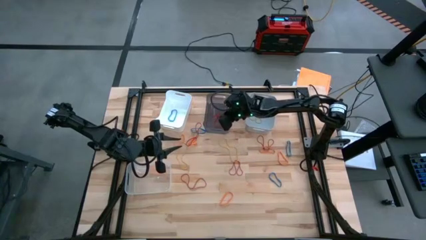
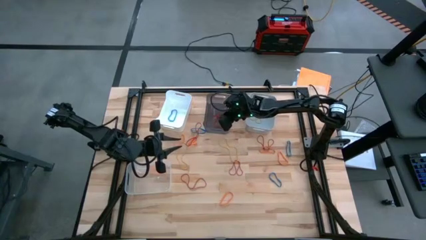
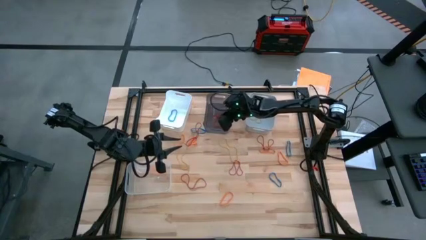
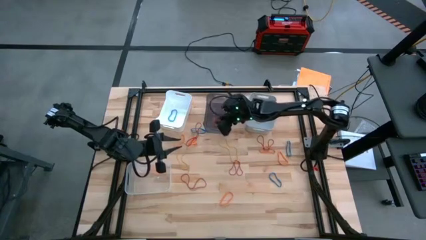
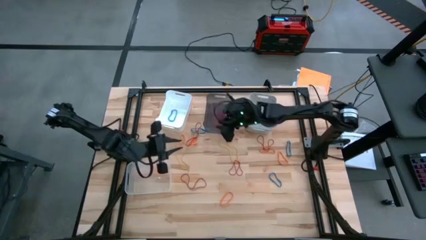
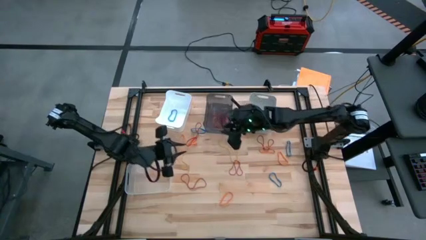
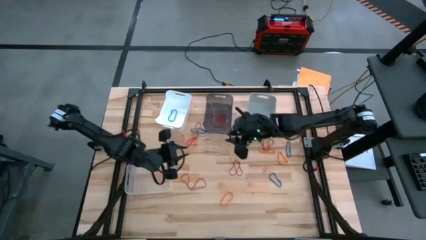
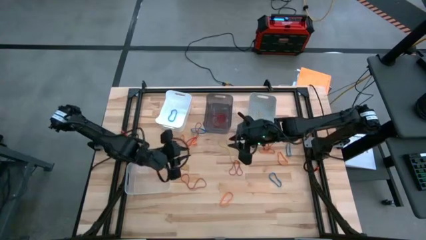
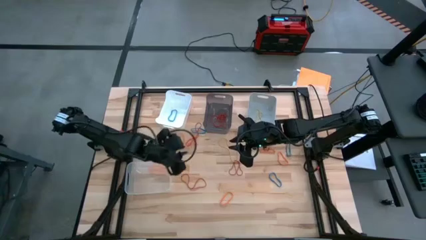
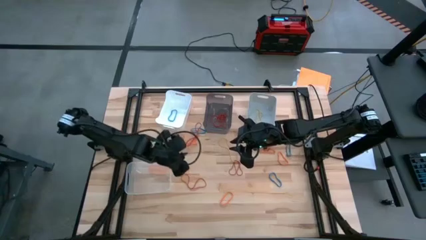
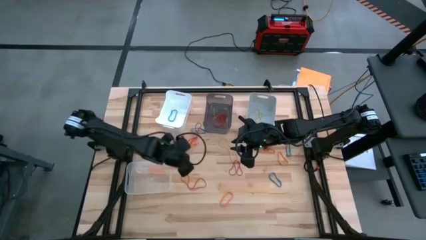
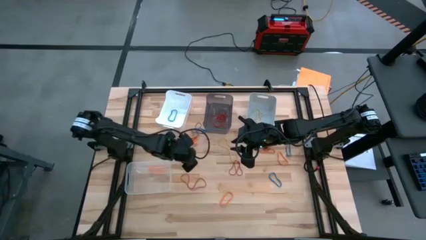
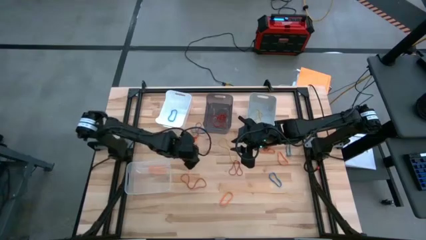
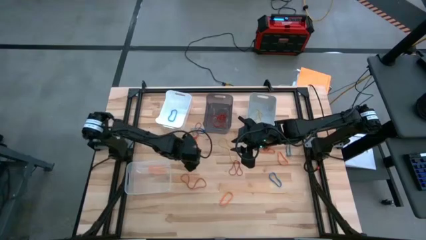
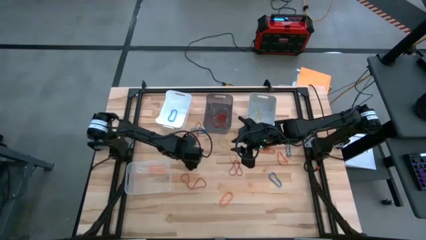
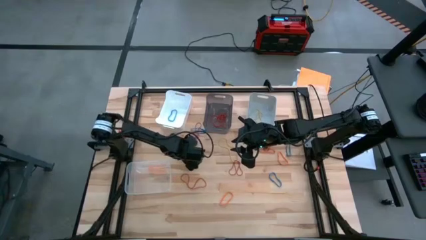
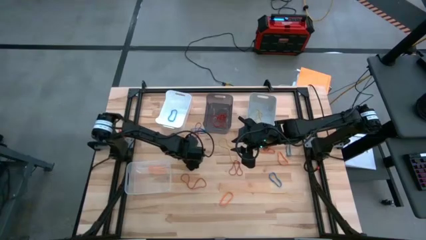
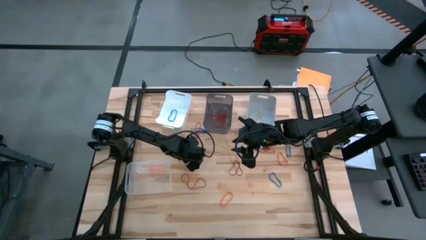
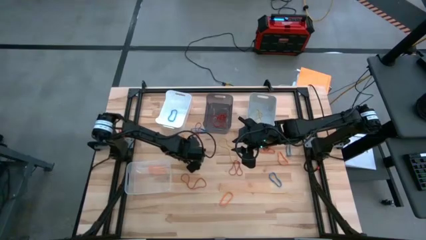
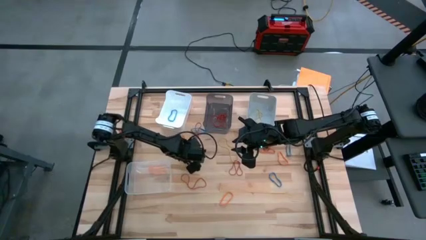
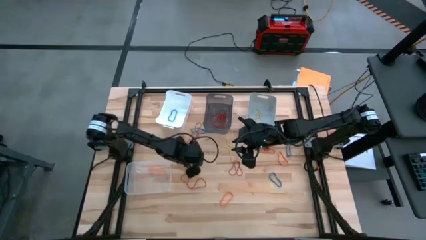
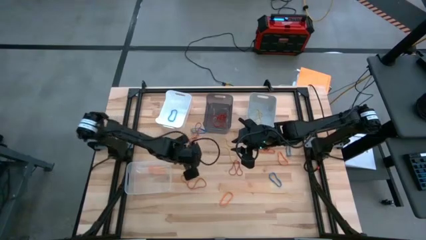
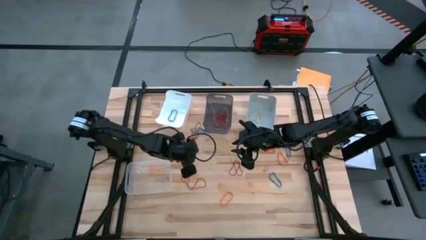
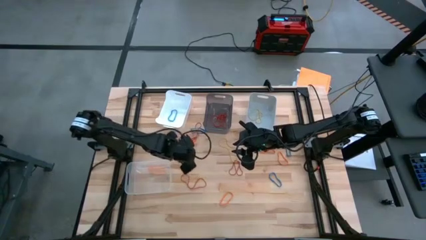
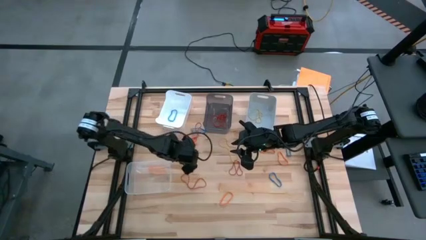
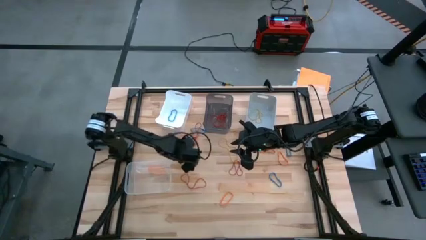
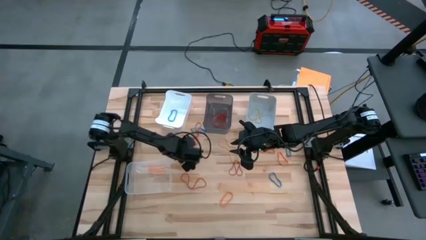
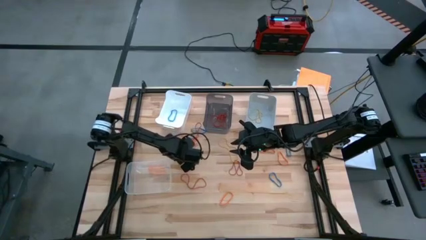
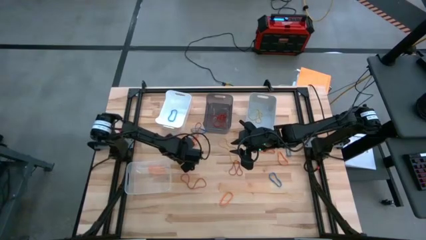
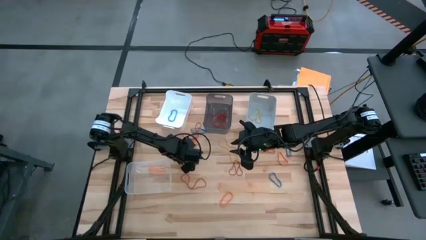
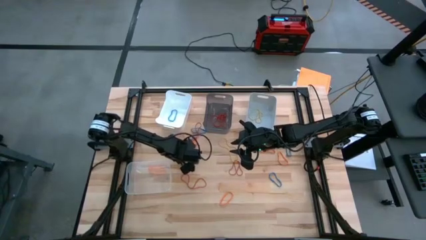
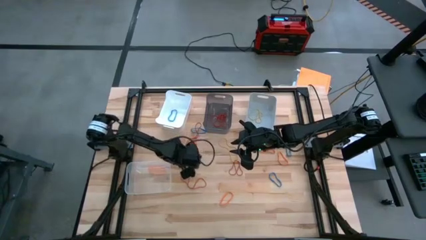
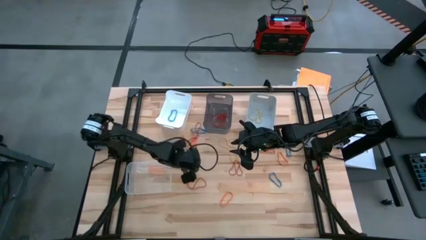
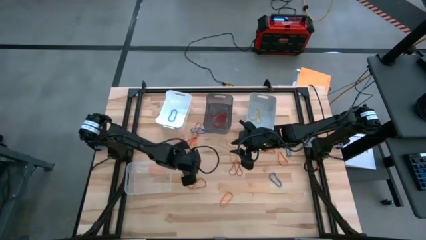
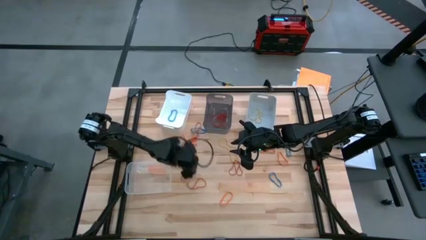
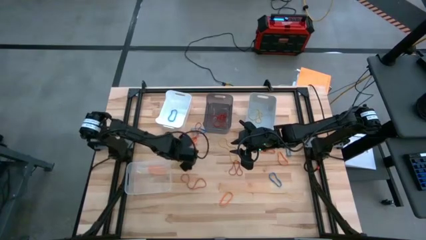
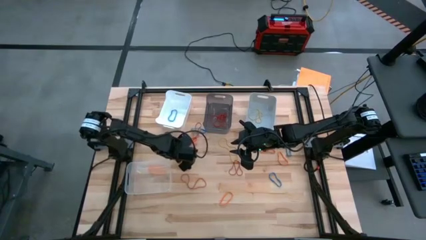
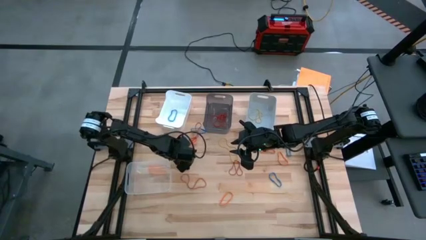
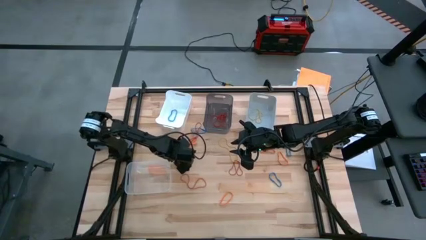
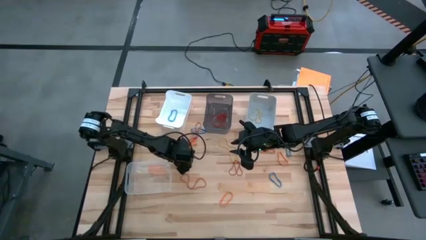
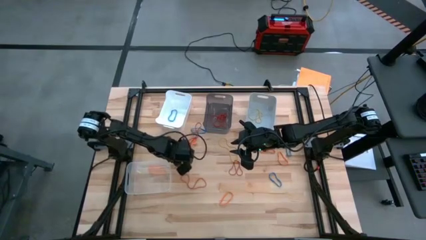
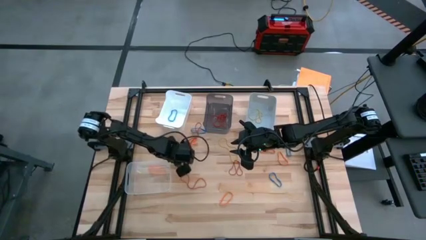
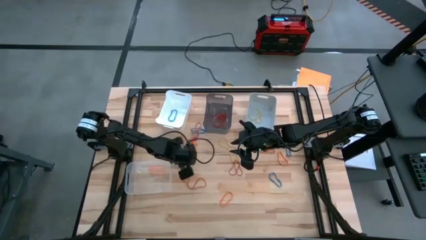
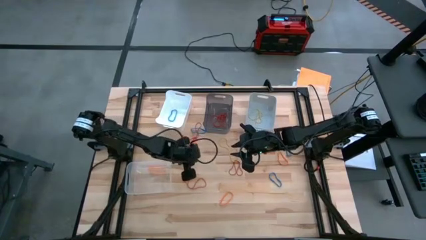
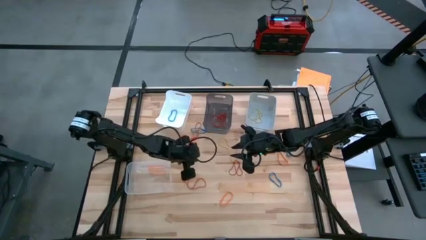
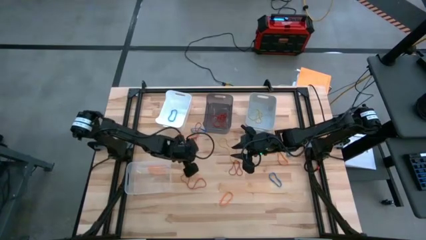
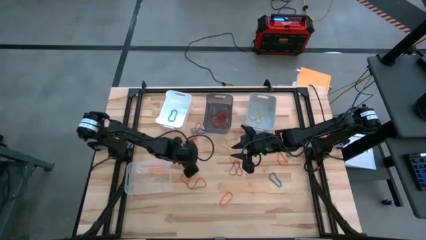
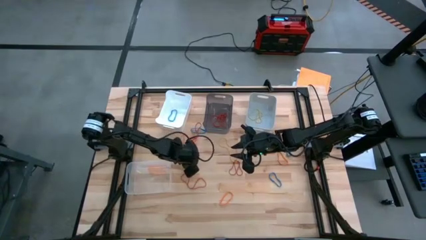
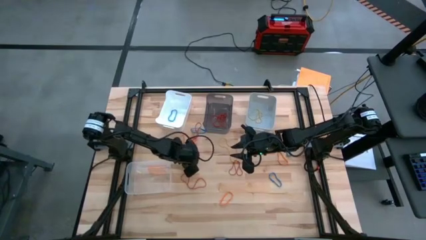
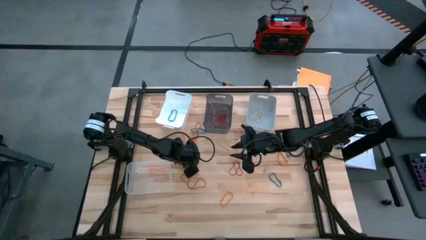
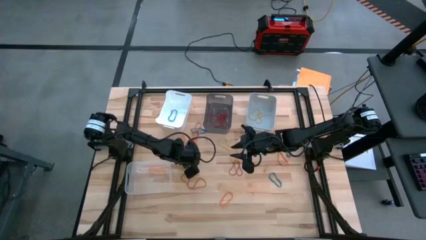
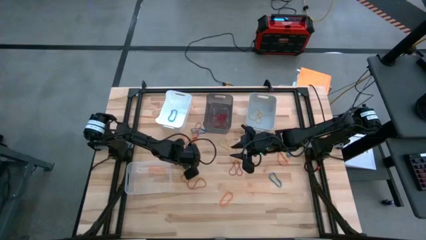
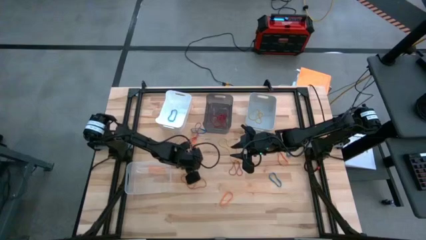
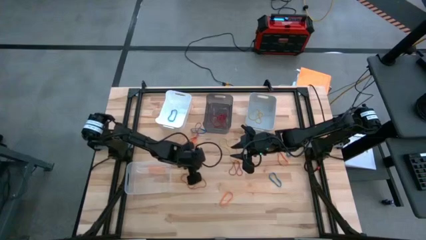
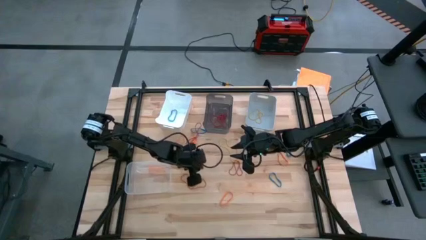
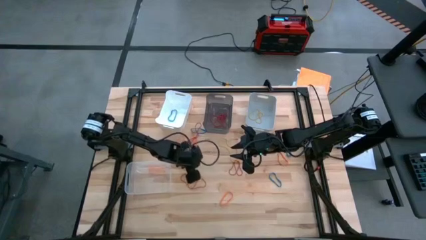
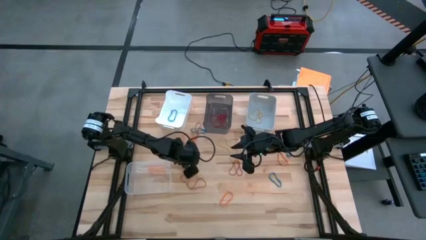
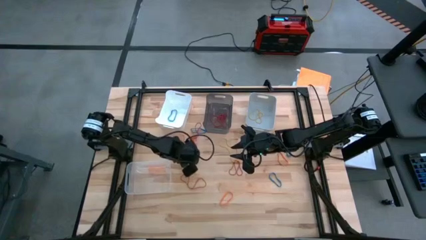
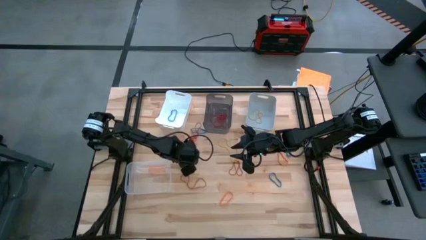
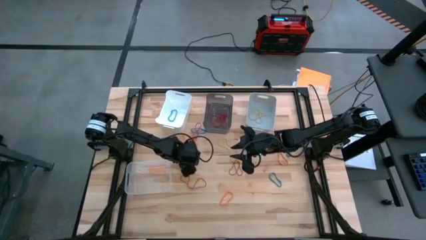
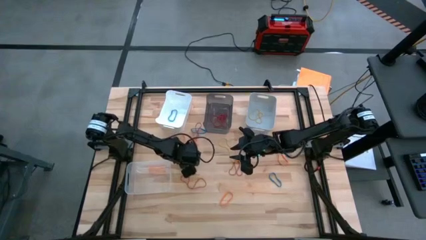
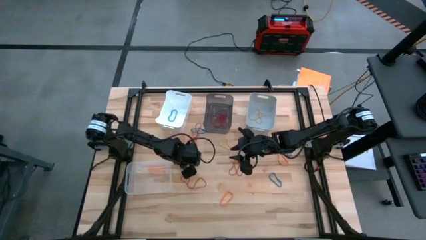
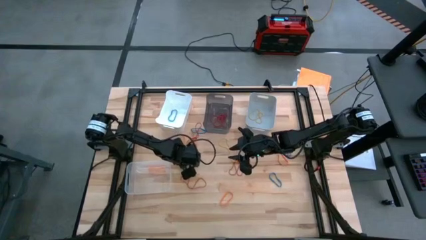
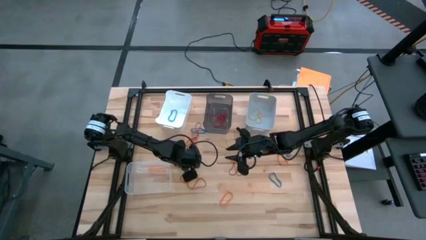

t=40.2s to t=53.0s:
Task: Sort rubber bands into baskets
Put the yellow rubber band into the gray bin

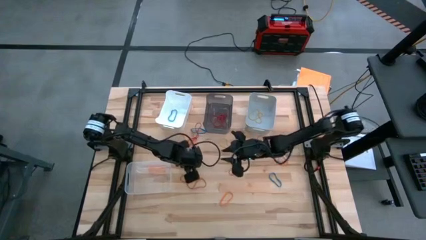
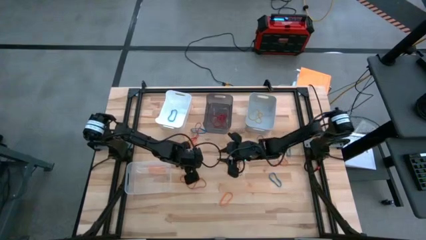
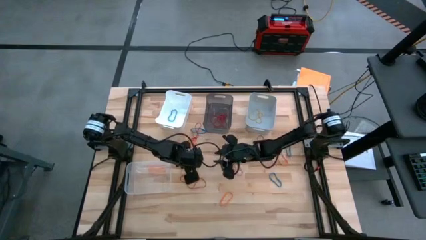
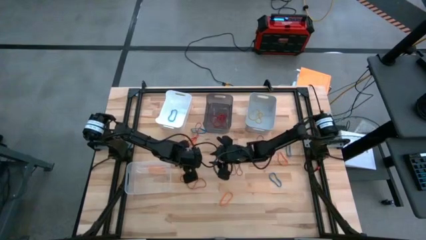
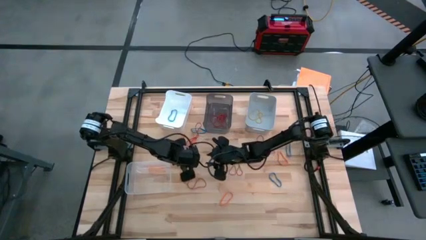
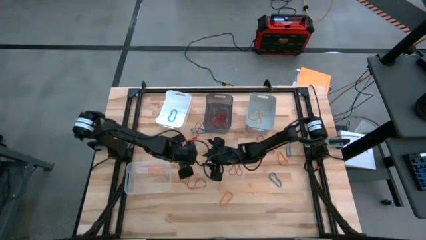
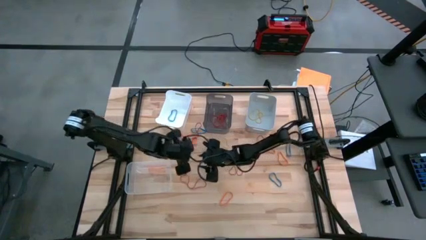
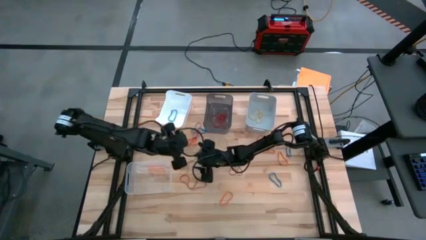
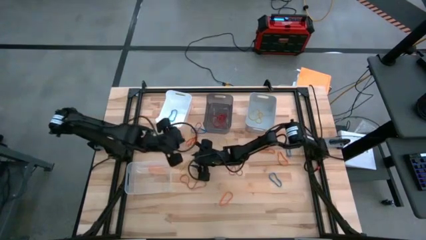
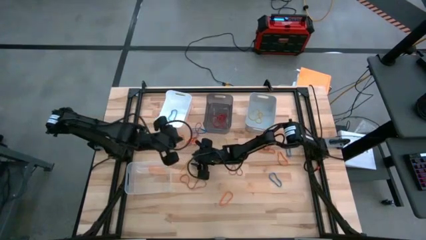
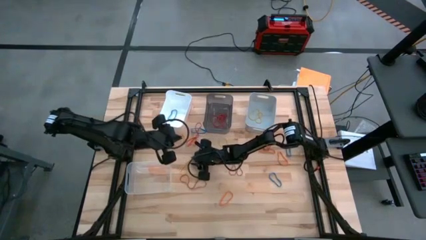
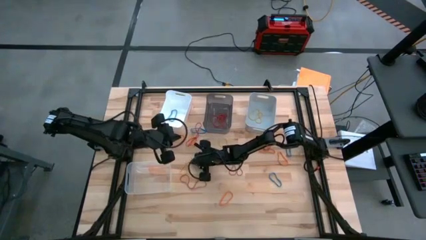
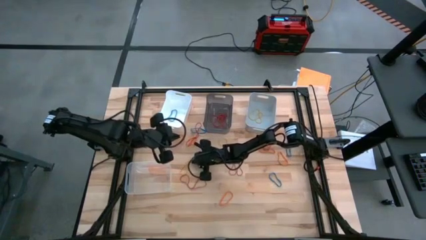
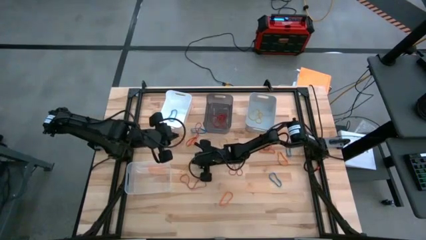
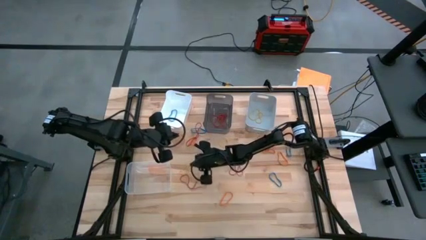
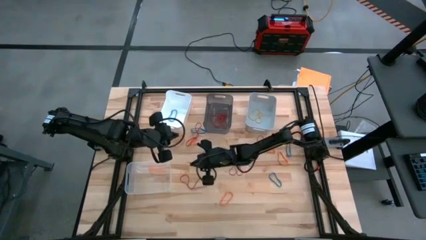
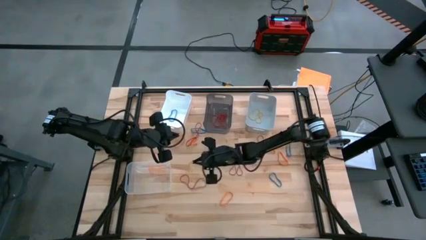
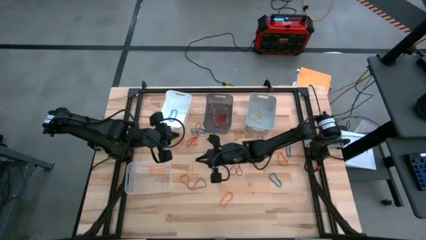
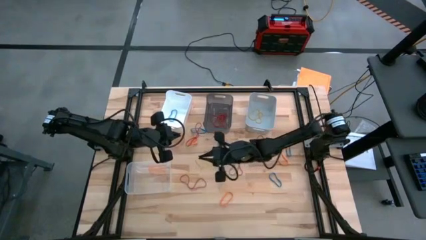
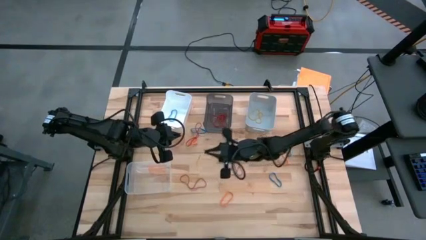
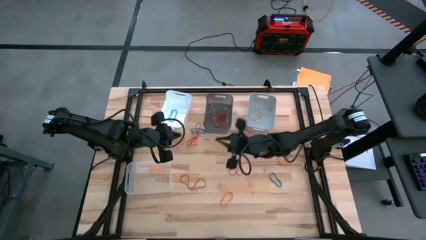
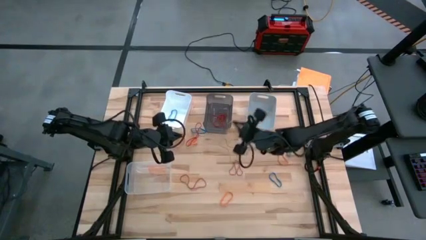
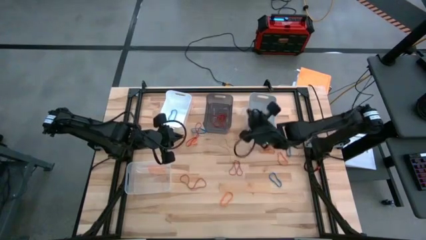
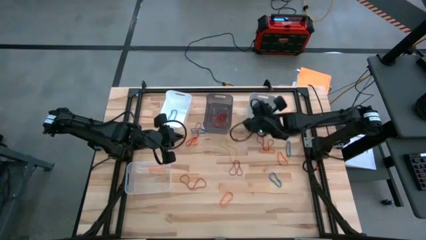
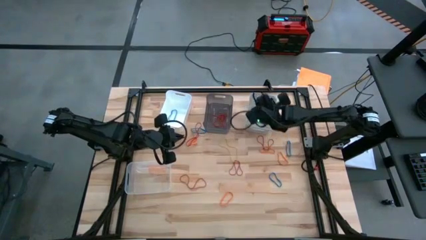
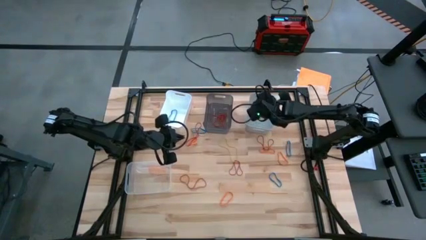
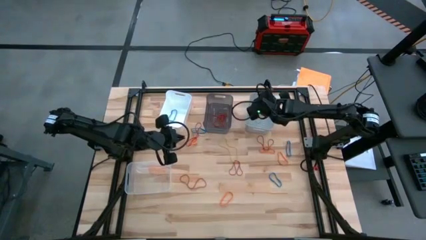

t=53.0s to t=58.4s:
Put the yellow rubber band into the gray bin
